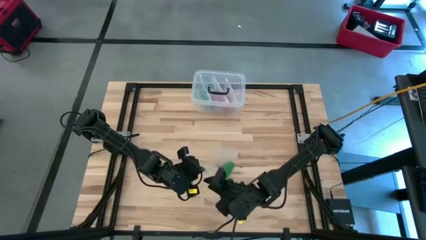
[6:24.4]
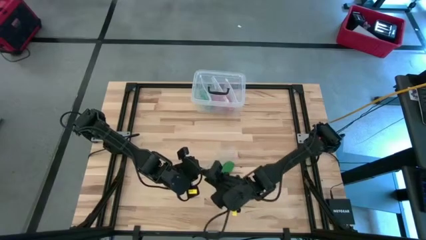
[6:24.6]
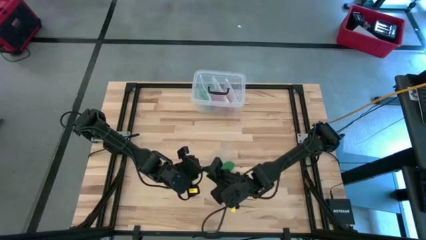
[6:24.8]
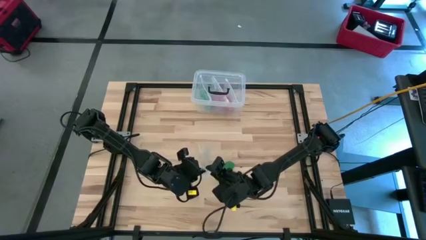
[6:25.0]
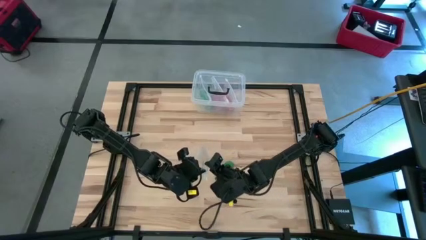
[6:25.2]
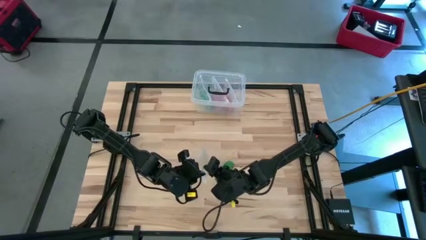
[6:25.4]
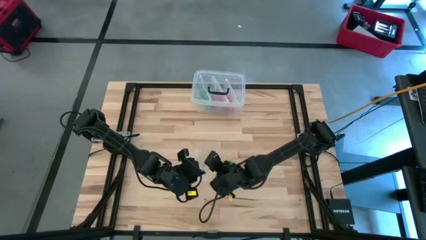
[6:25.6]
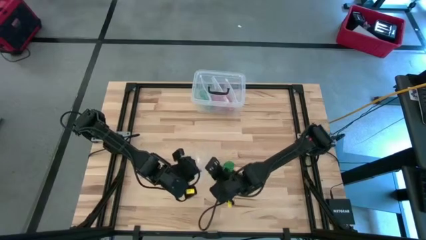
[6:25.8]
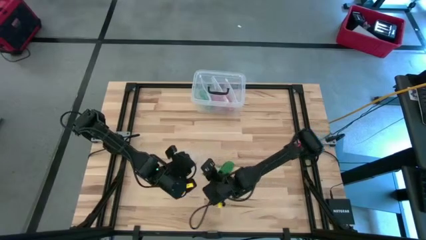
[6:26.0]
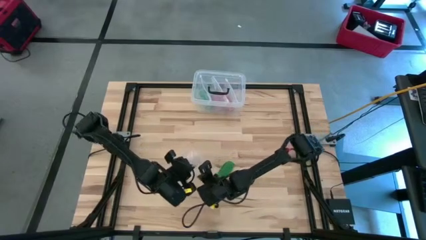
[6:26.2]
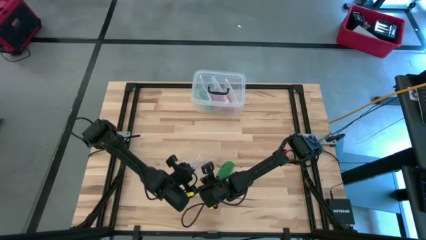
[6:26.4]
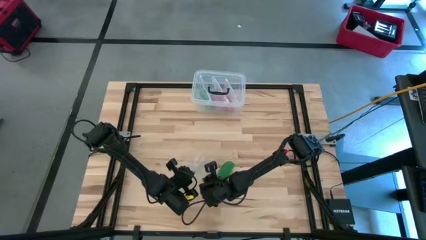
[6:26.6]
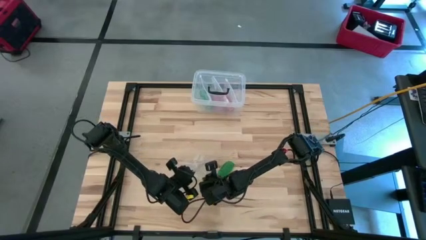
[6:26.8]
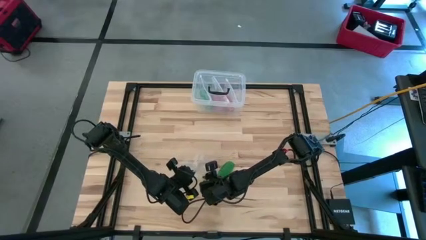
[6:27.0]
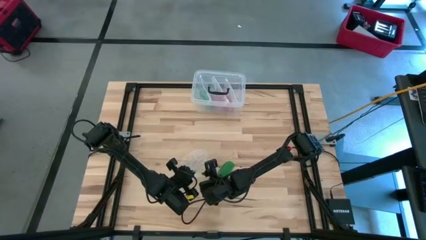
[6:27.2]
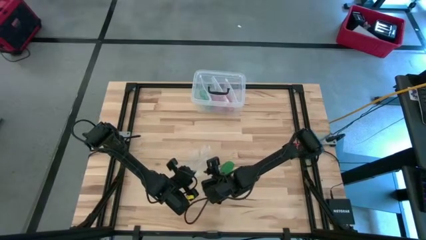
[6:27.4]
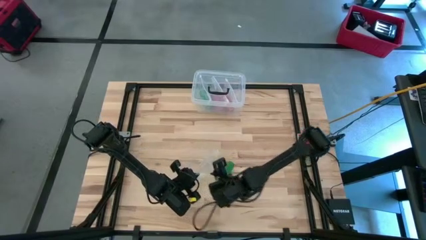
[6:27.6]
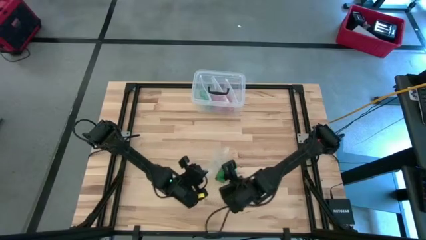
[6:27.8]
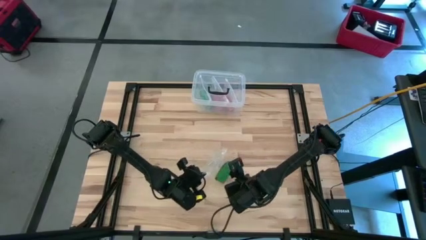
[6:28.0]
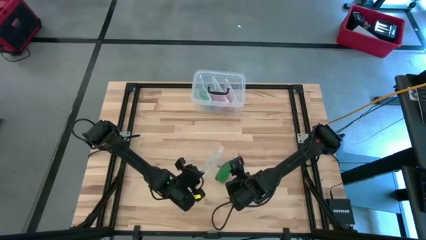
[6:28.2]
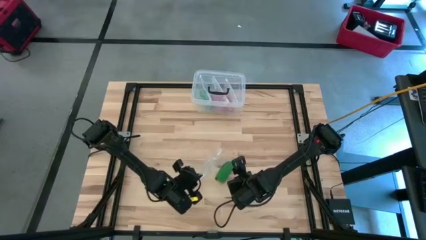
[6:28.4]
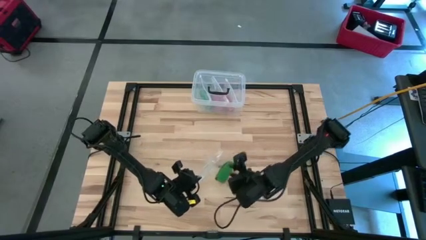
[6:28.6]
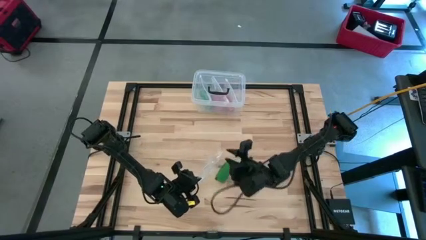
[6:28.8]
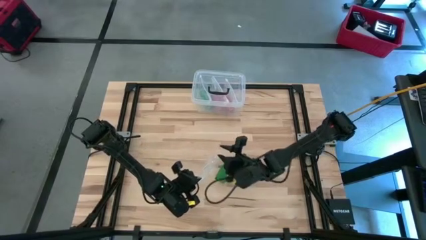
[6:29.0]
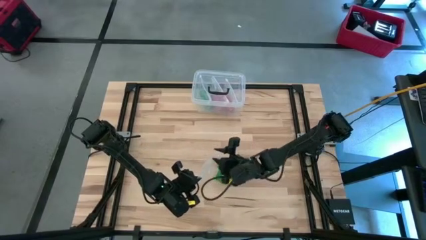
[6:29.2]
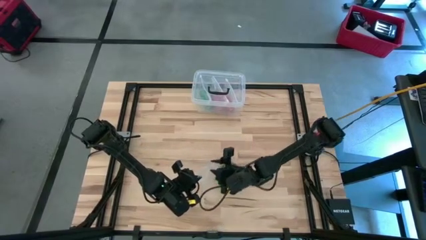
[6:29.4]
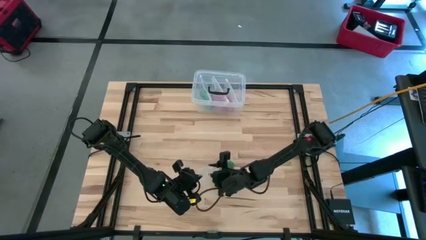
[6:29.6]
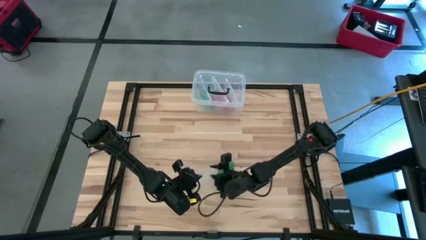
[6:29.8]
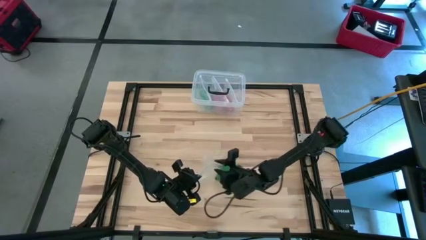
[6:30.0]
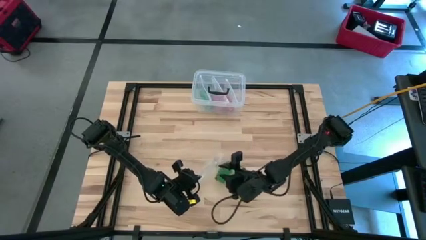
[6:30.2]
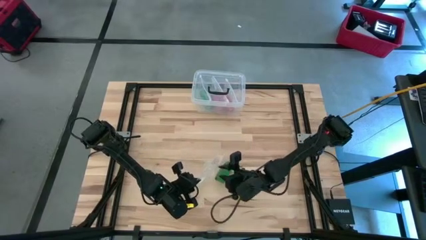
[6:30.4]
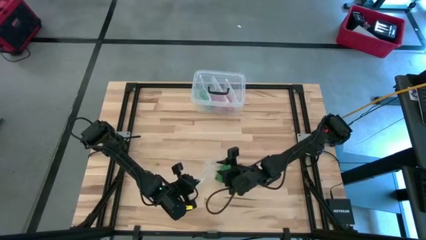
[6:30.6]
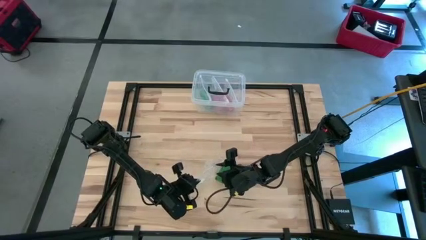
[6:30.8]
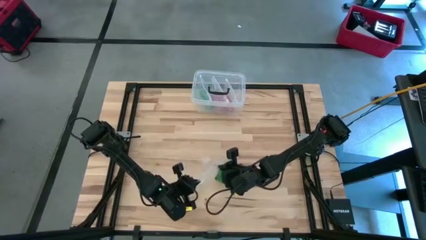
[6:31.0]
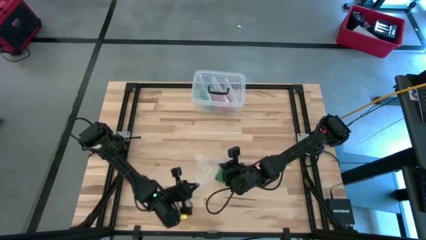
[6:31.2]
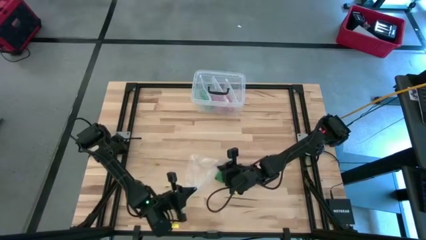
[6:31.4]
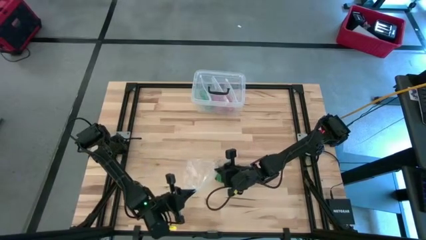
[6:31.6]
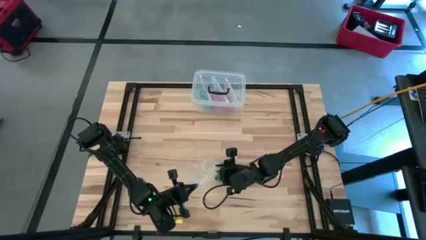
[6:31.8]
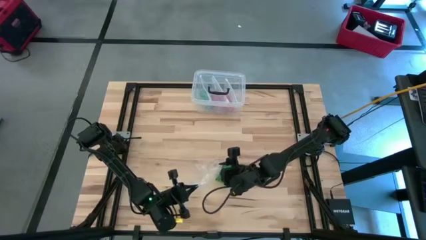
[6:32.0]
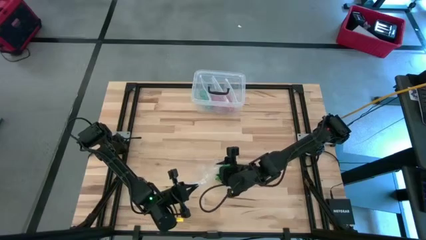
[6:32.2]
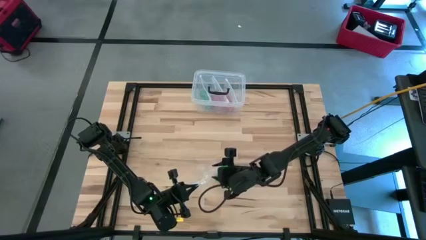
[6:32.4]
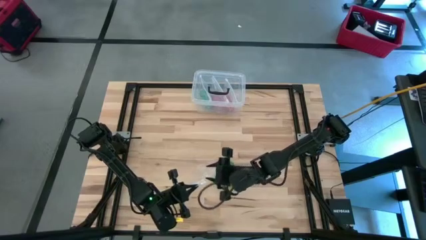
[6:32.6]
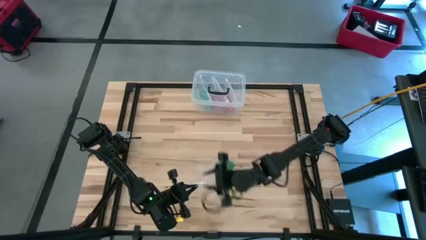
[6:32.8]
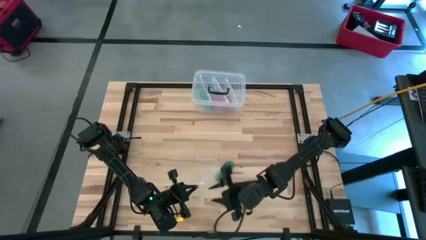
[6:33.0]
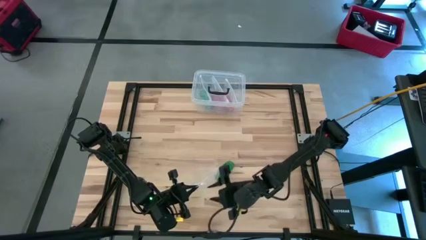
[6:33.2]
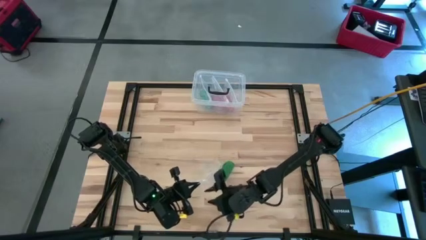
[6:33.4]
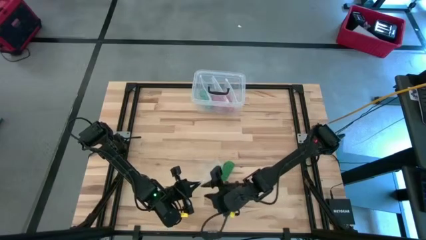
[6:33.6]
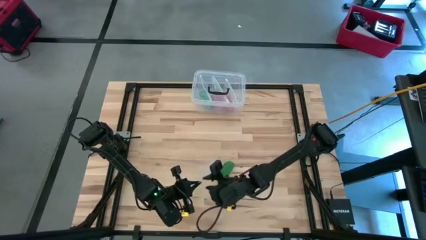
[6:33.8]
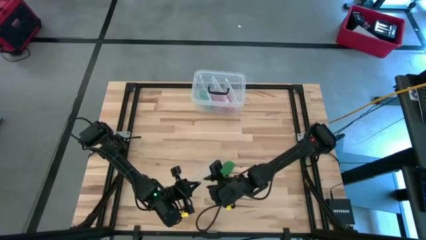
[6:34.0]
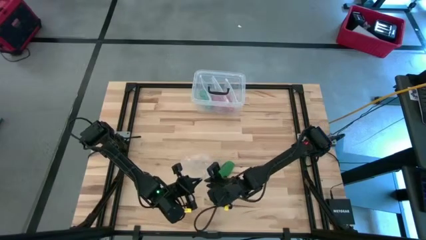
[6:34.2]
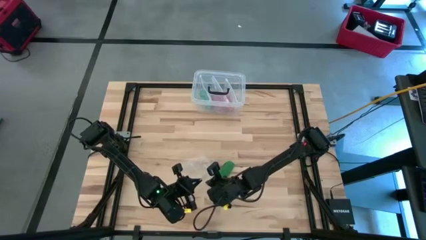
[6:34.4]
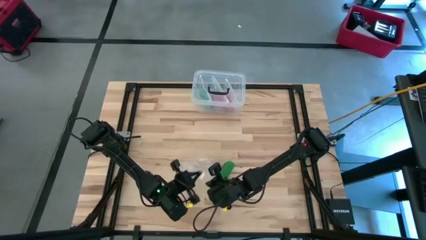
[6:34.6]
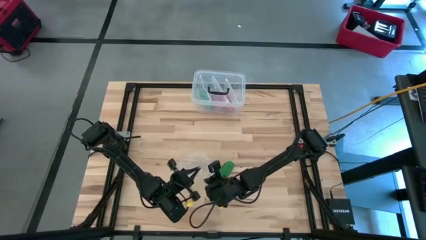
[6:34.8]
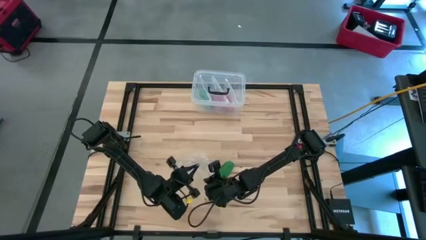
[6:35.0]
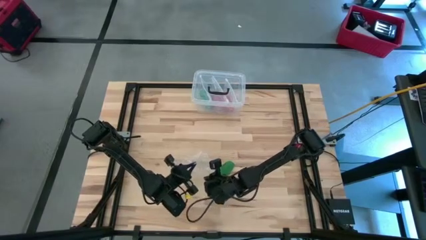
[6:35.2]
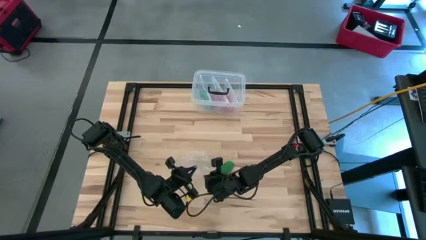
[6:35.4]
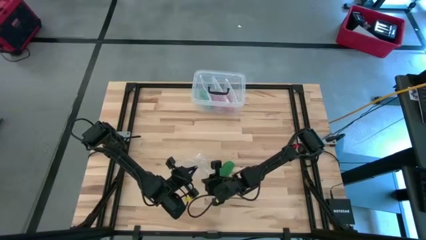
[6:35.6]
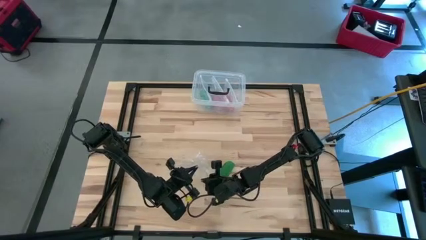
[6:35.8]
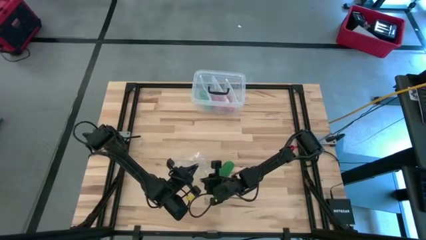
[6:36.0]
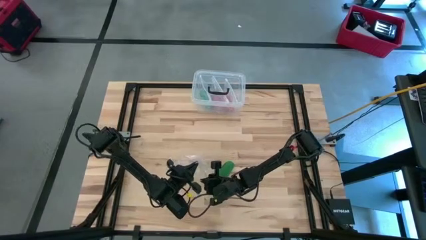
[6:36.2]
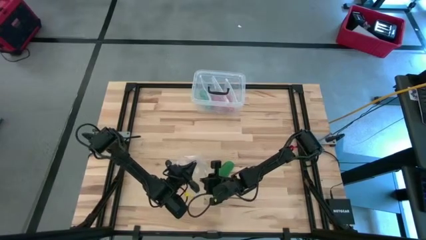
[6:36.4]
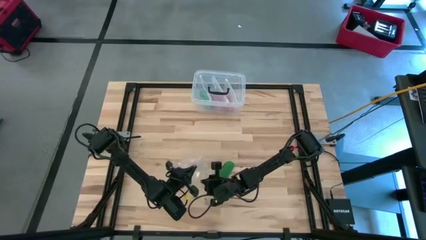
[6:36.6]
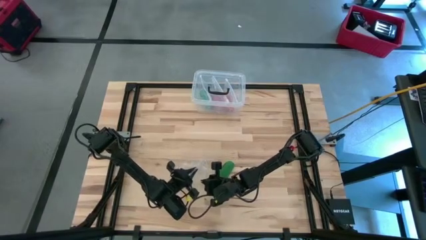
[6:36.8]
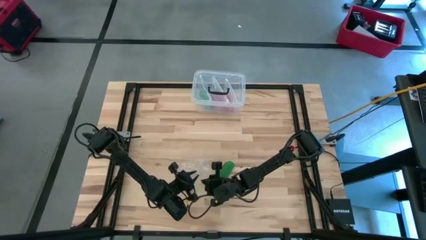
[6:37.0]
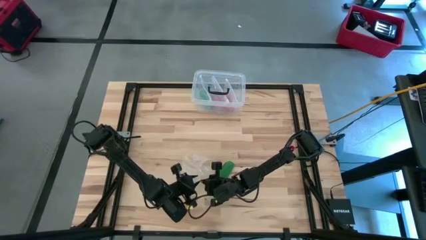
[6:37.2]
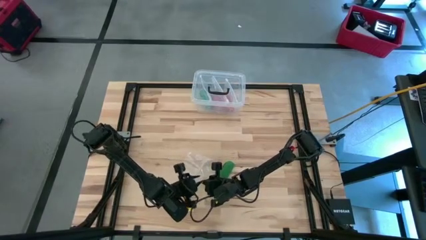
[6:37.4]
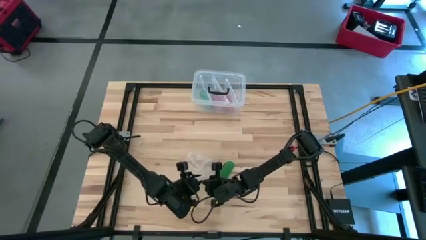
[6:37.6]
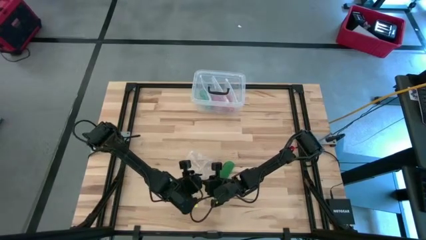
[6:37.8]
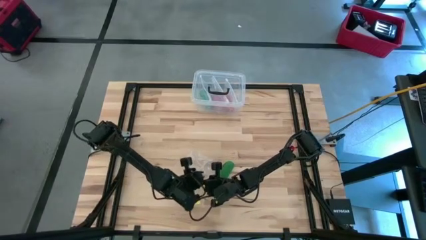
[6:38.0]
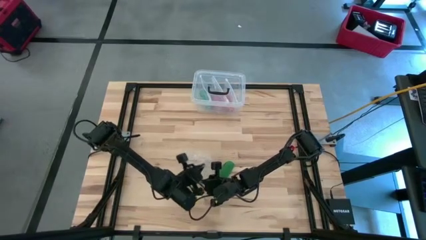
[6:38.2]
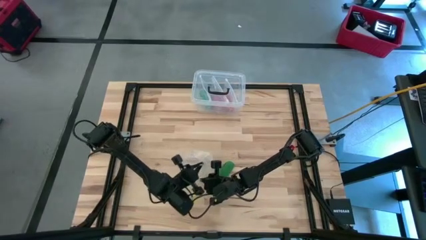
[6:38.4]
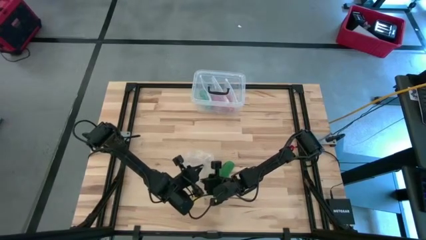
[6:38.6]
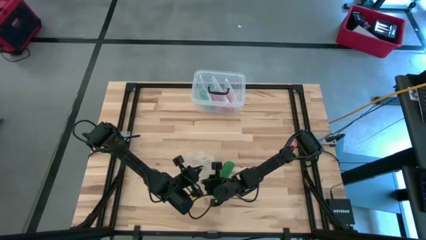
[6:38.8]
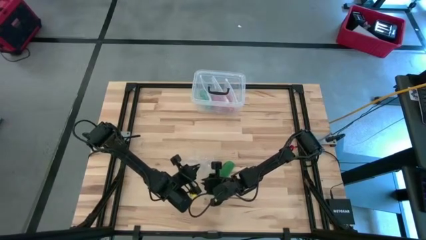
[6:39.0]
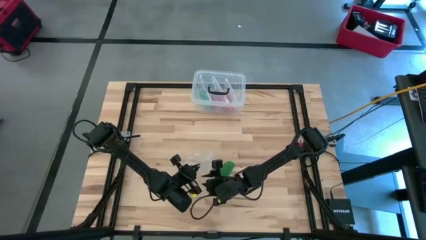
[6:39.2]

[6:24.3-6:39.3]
Task: Roll bandage
Open the transparent zip lock bag
